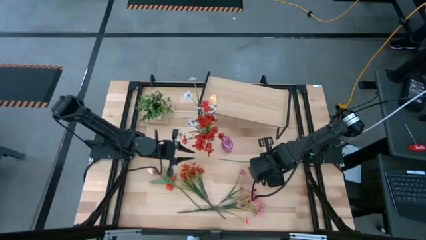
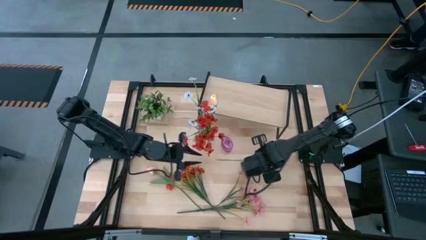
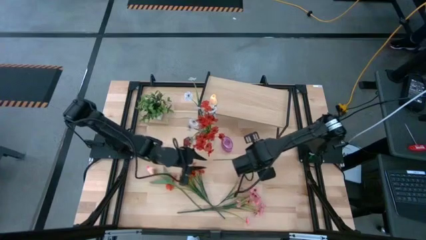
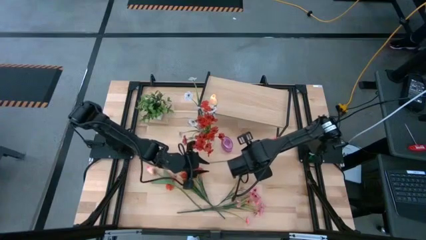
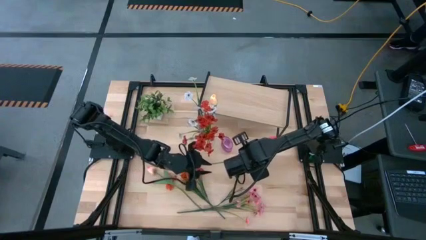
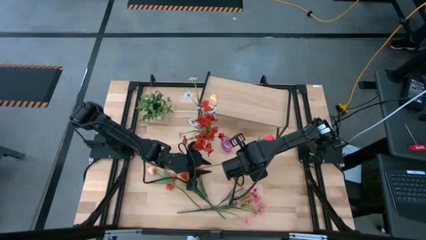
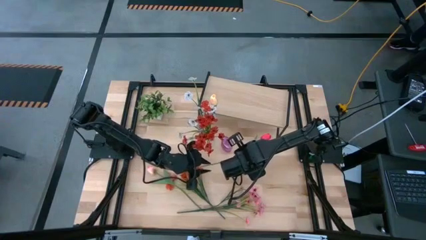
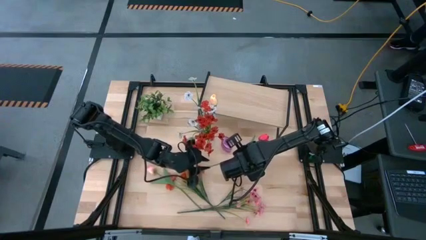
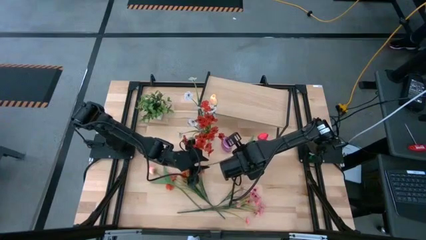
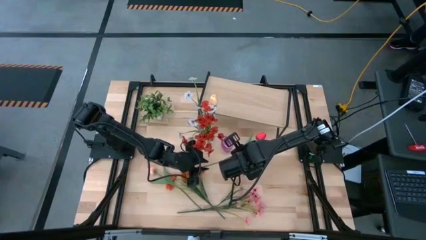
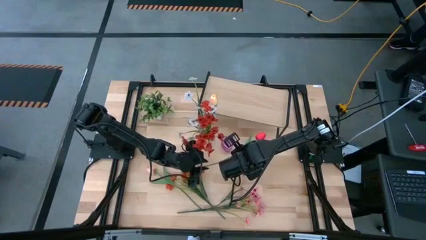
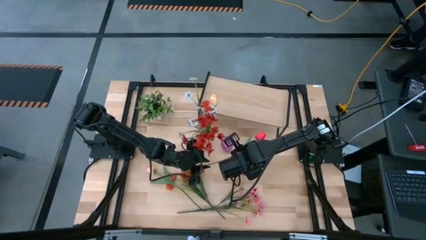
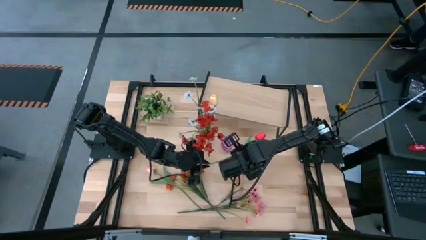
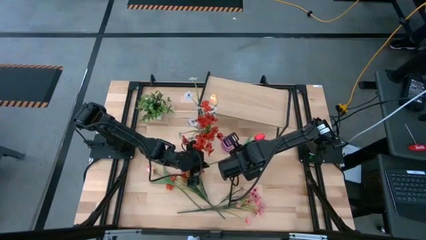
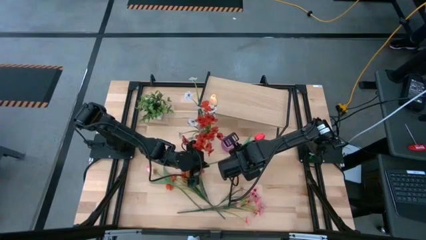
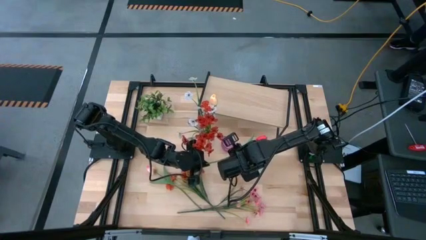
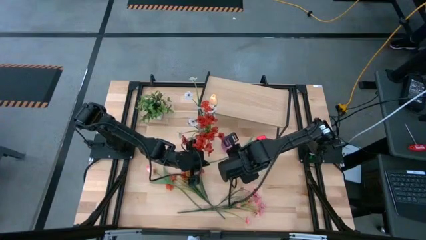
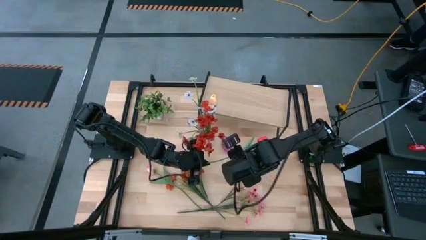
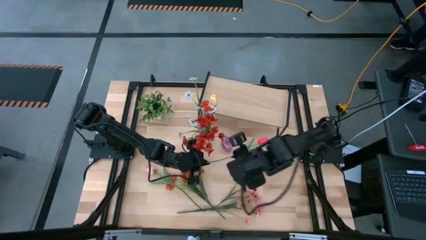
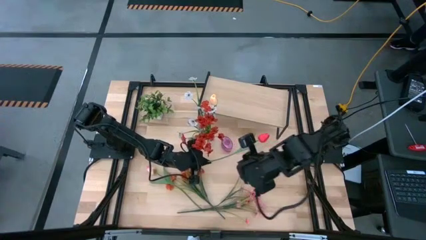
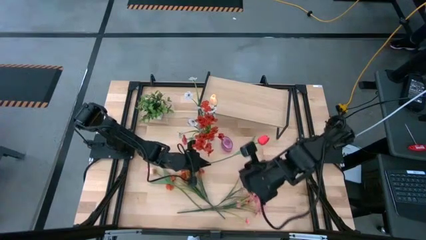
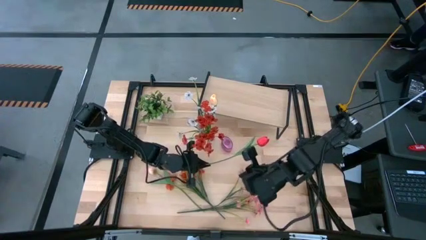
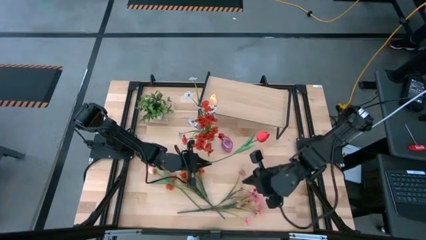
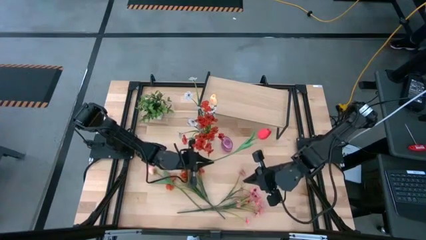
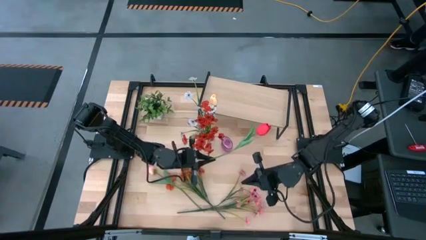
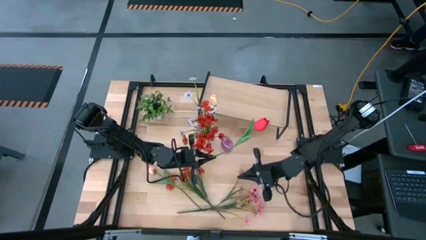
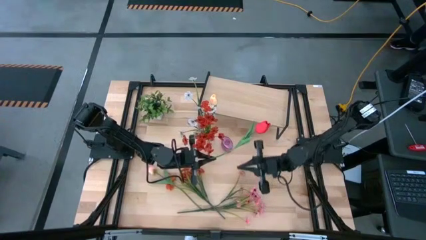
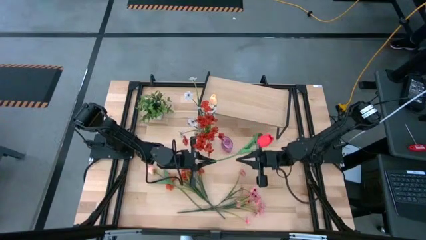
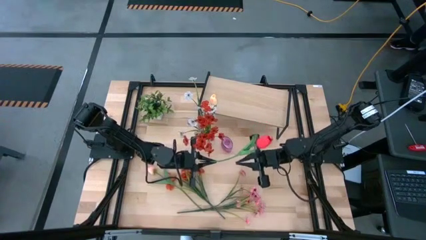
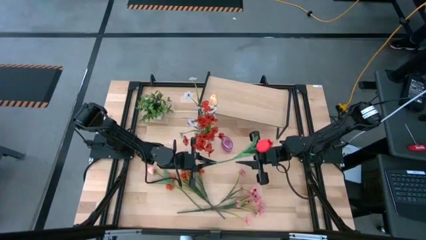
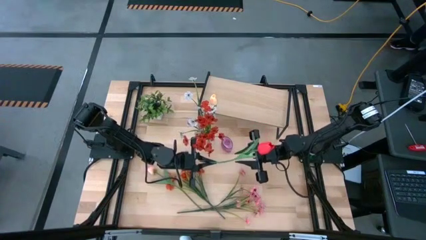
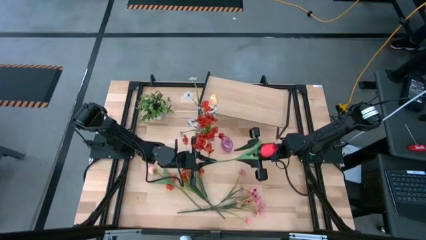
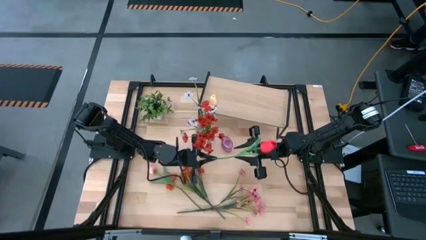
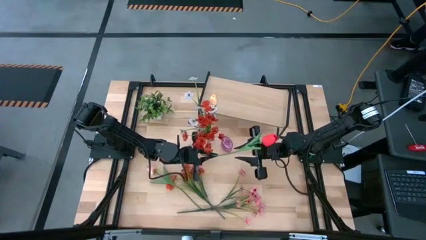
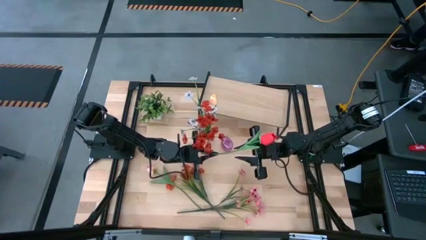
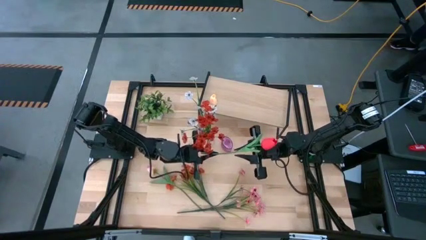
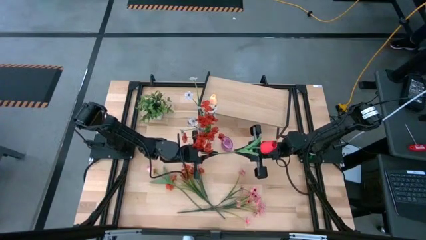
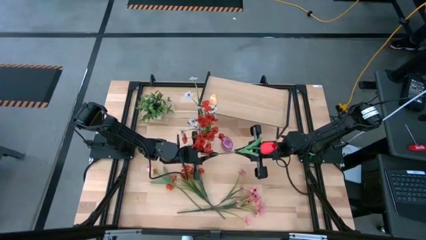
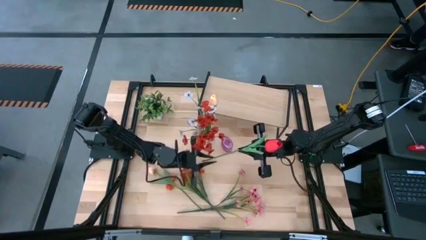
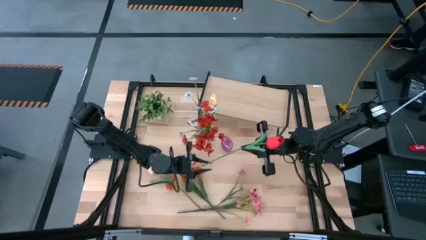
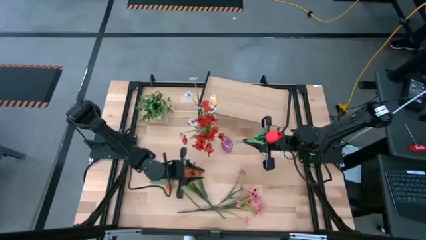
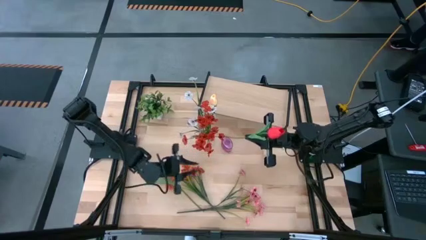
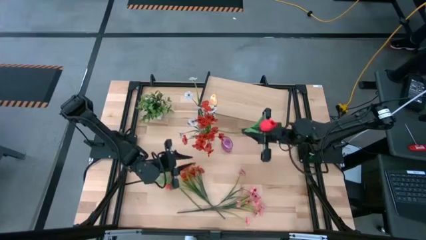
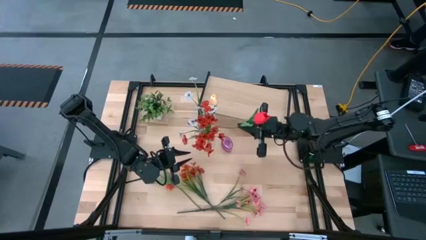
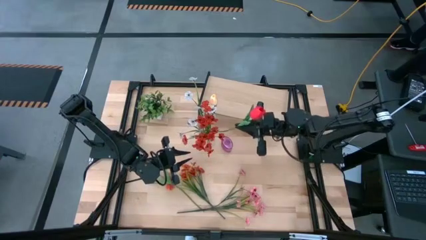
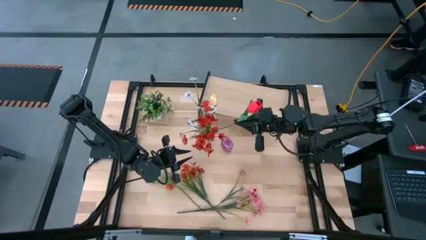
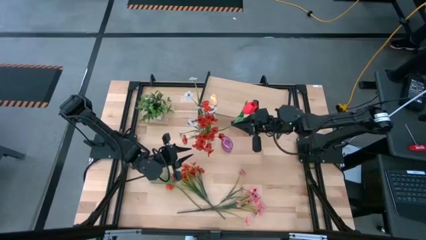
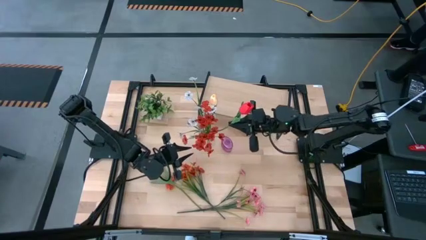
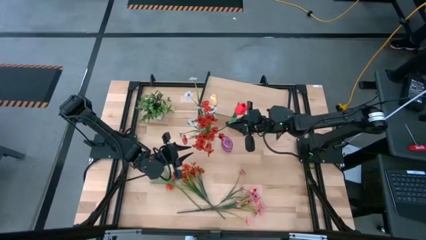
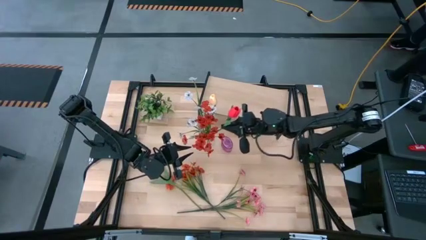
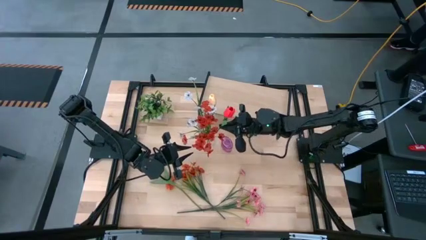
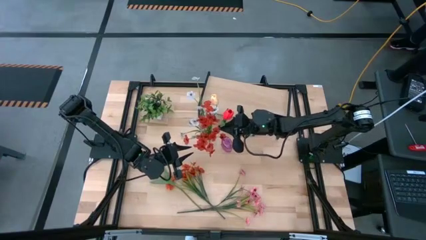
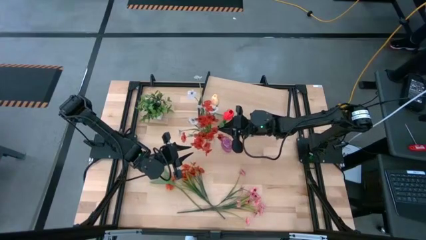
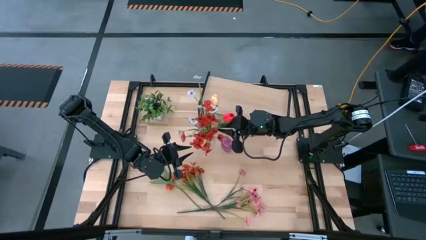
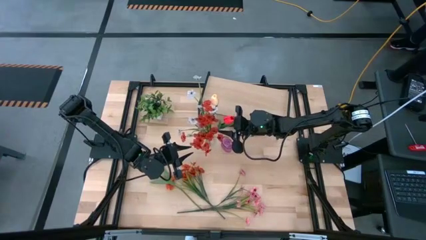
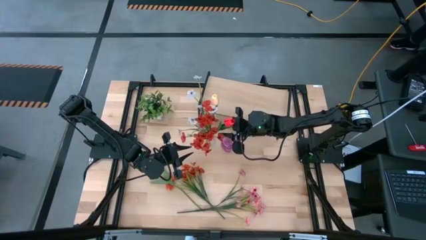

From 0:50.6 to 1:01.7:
Task: Pick and place flowers into a vace then onto a shelf
Put the red tulip into the transparent vase

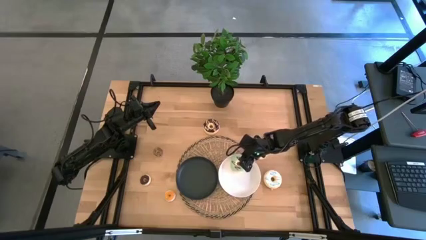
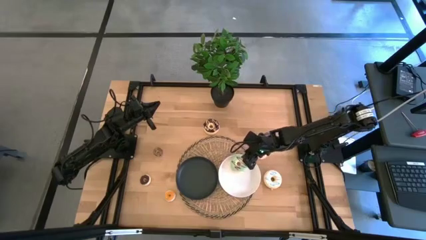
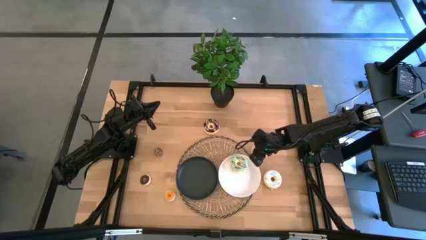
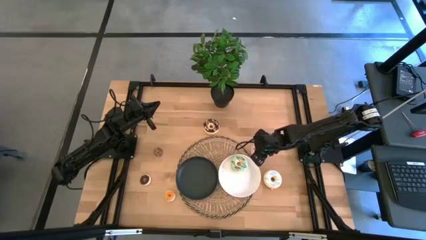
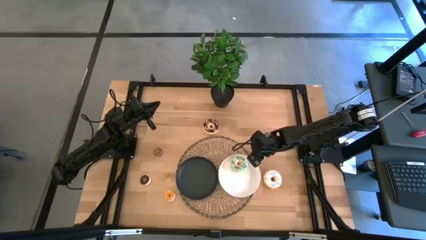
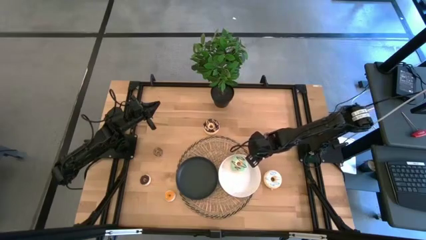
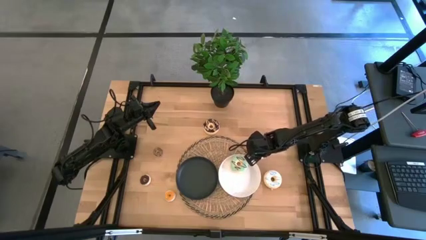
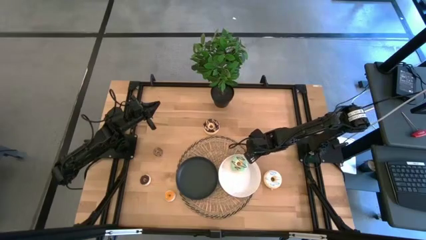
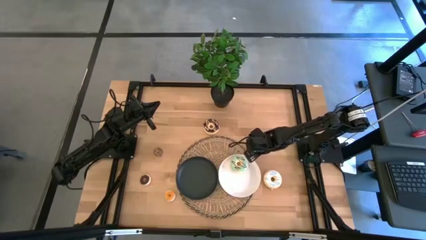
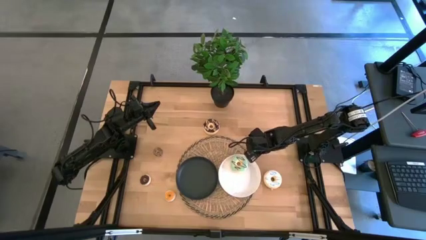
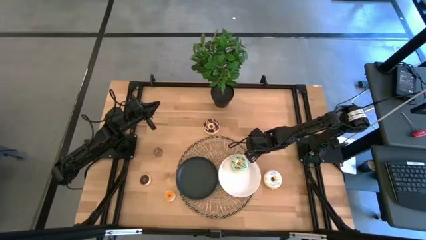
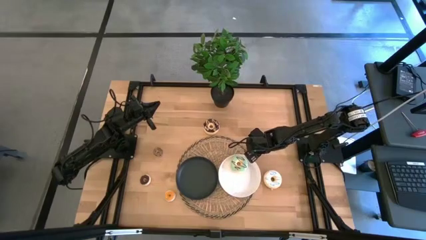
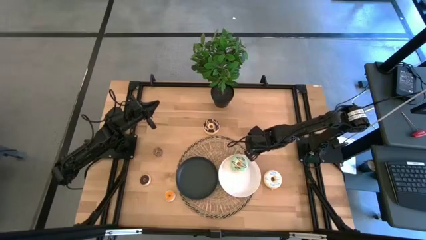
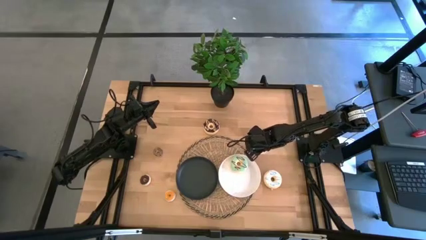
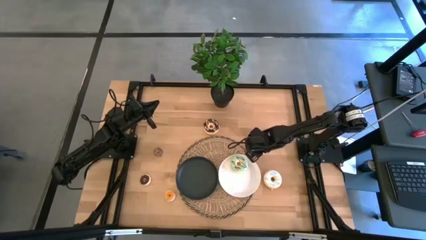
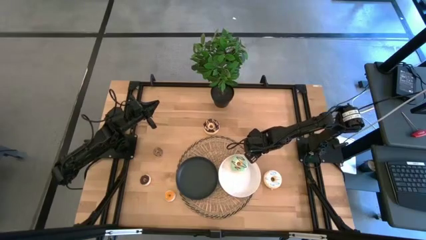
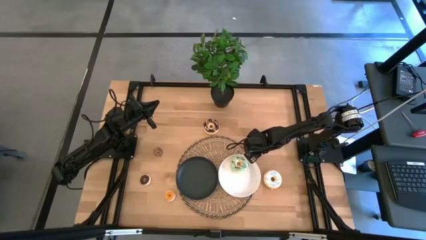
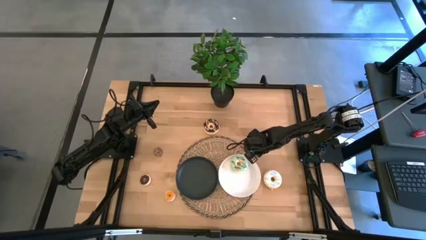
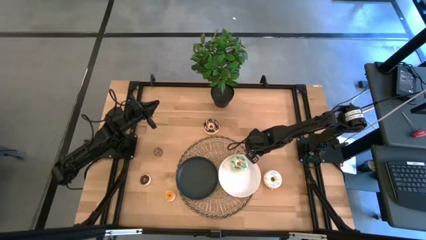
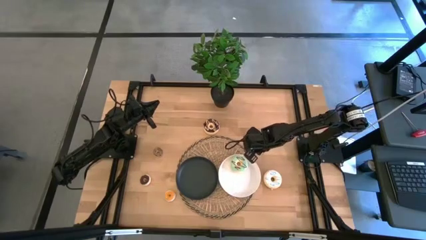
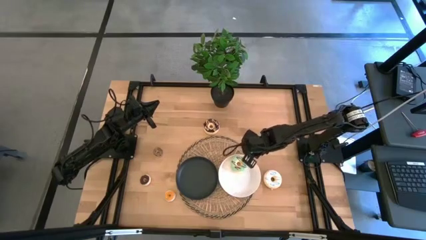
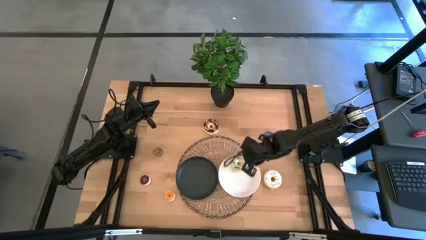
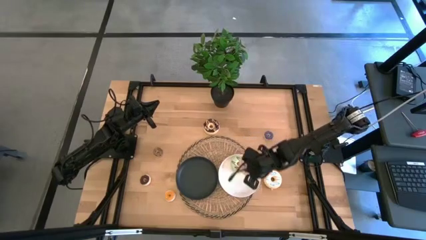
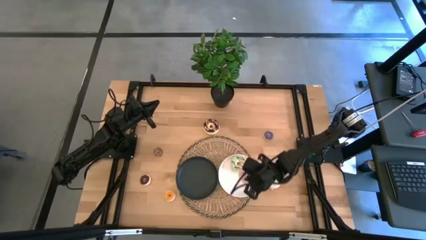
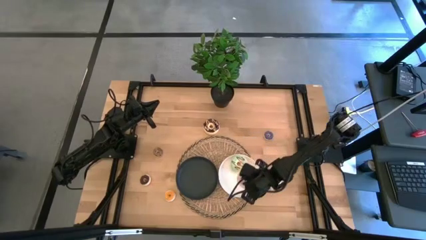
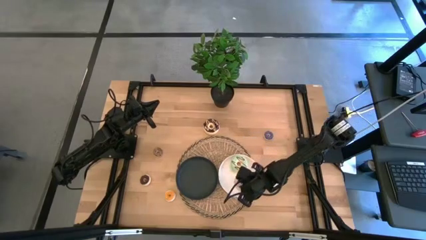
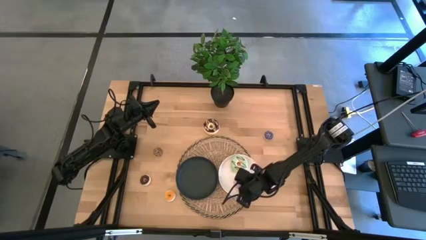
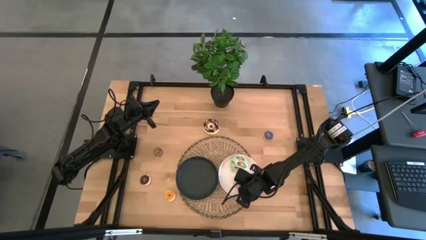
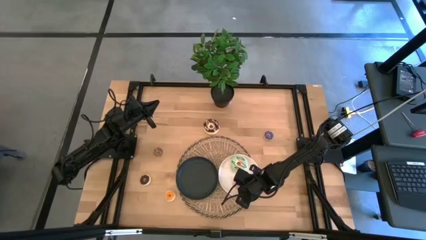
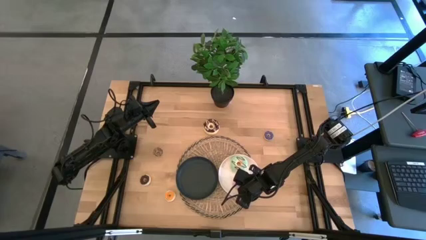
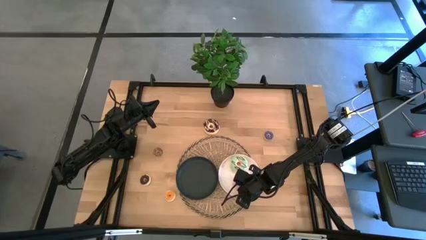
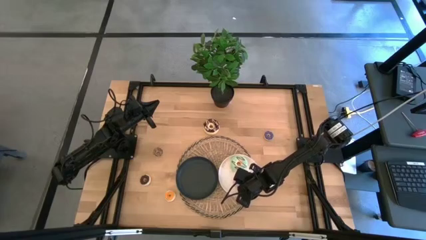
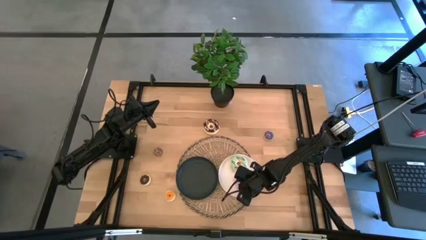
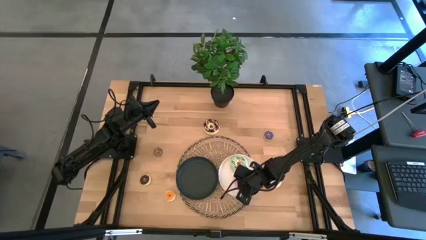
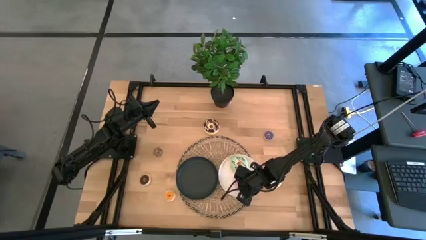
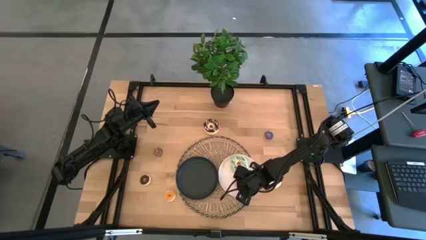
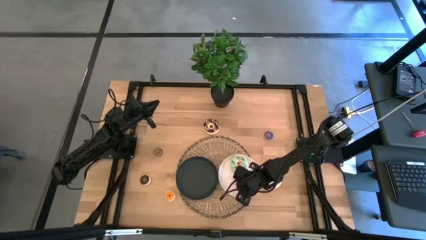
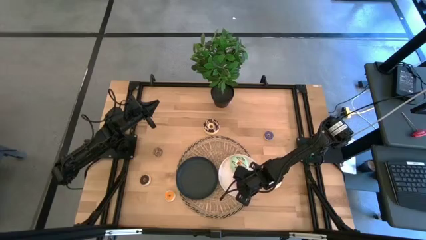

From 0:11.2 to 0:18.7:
Task: Pick & Place donuts
Put the large purple donut on the white plate
